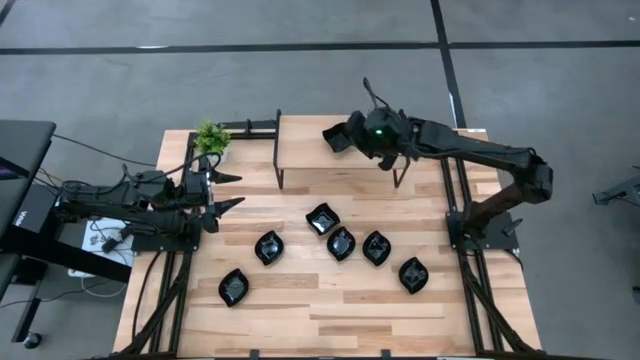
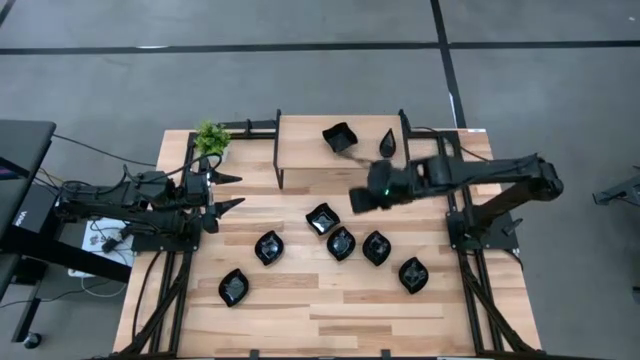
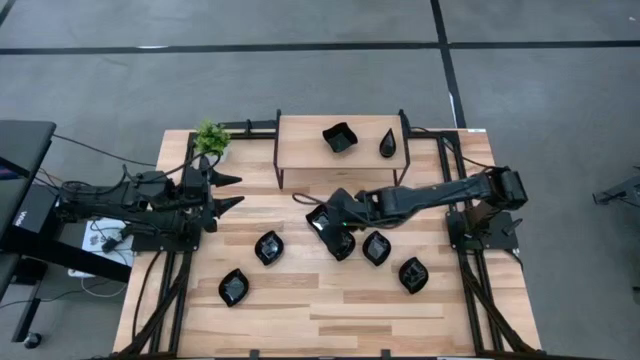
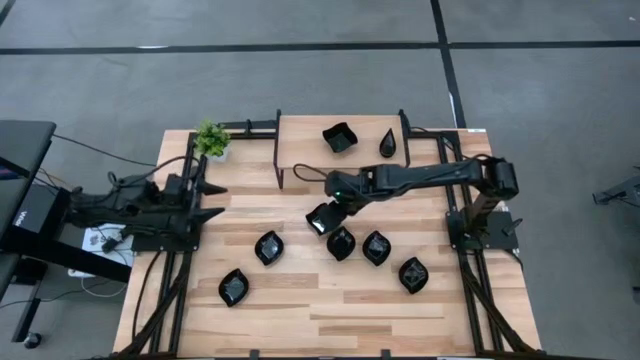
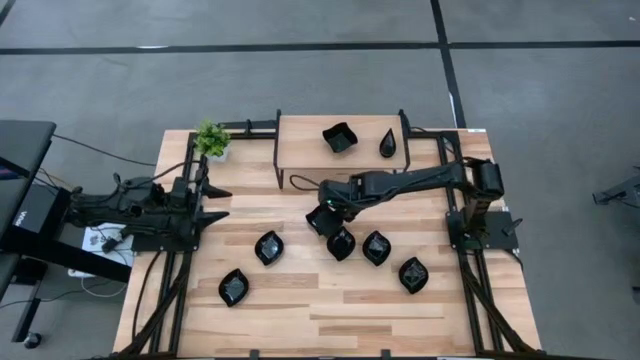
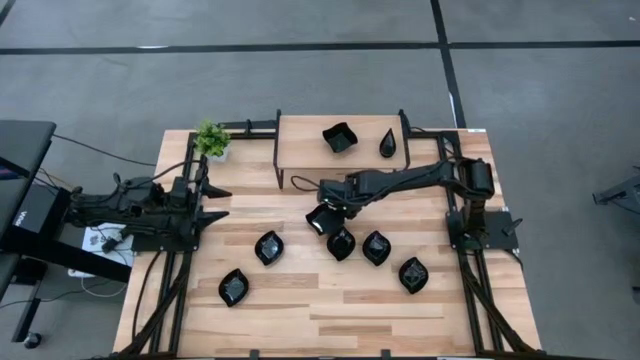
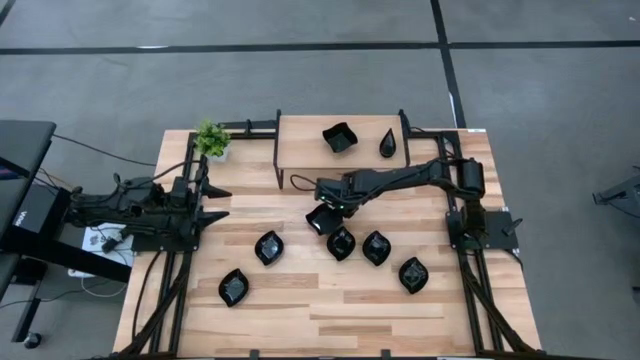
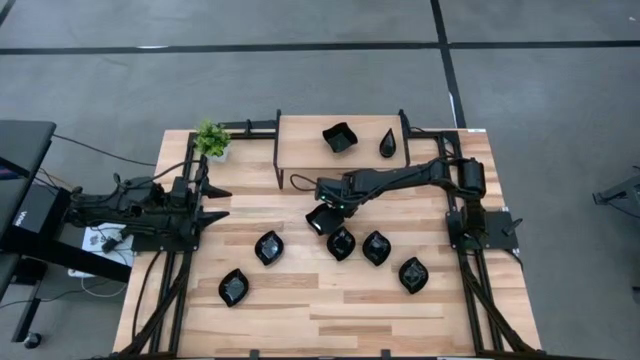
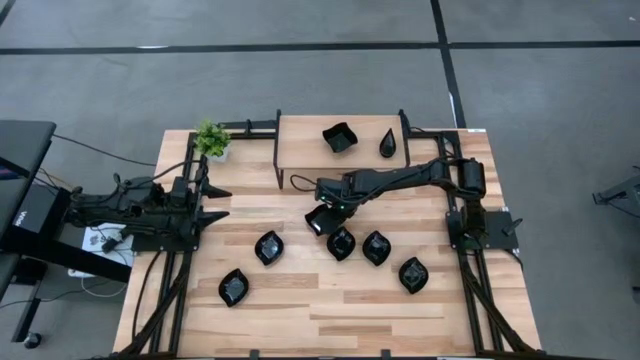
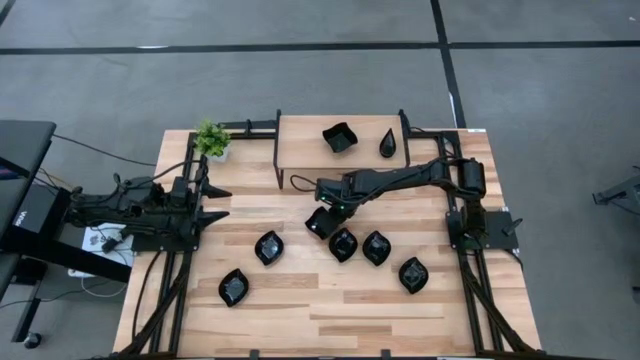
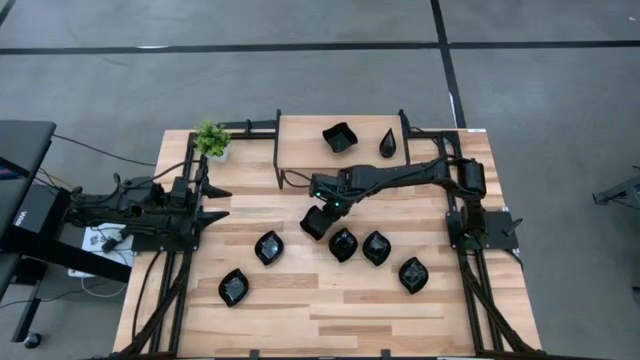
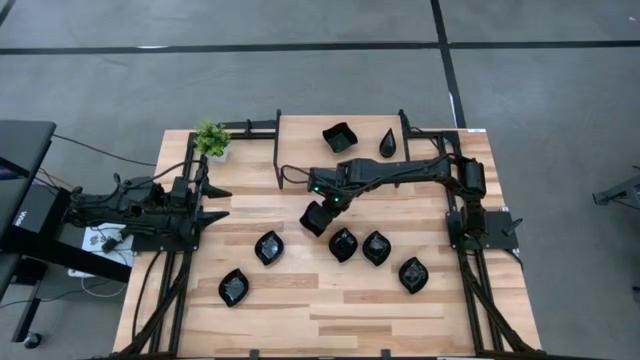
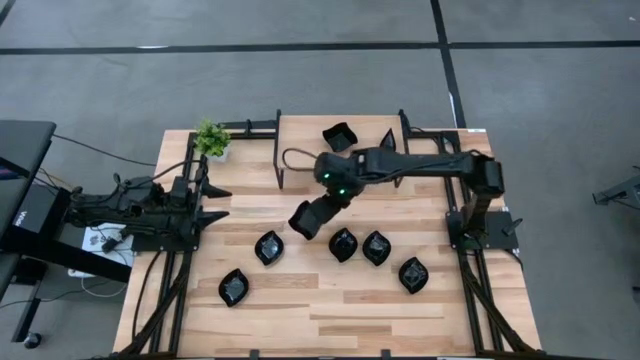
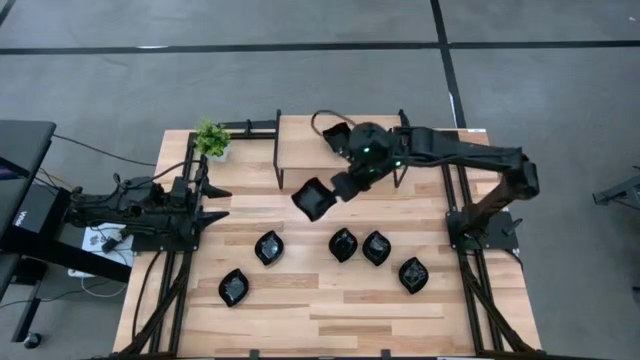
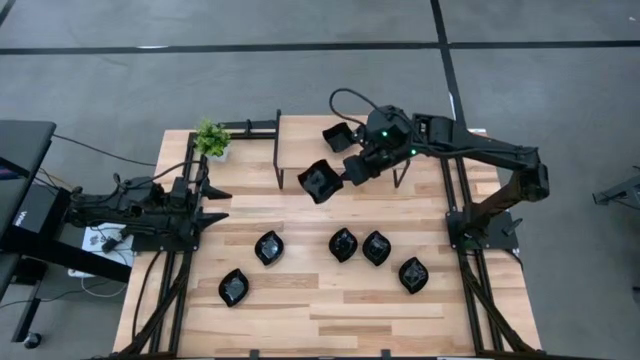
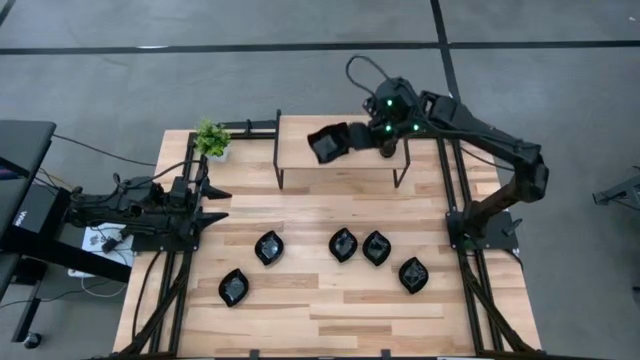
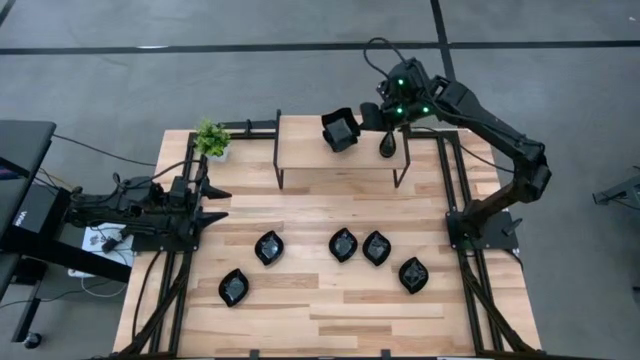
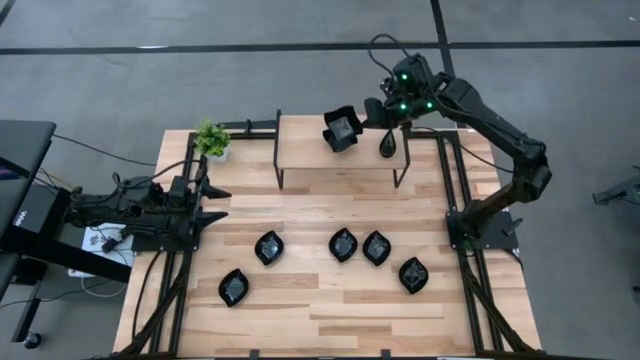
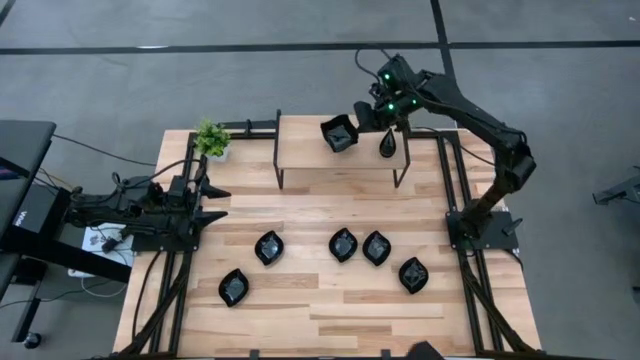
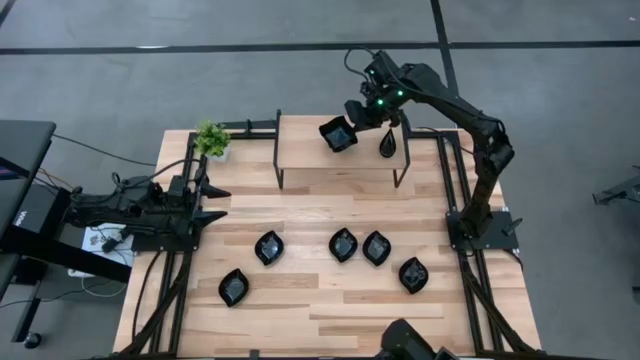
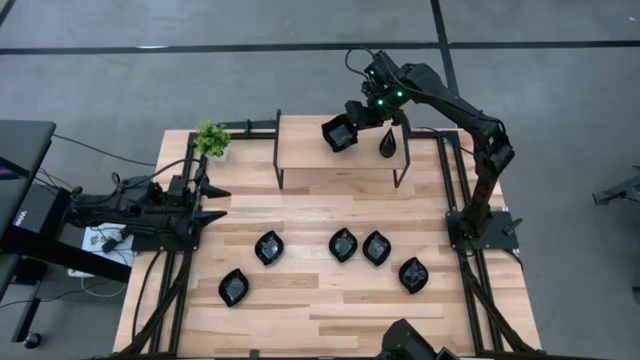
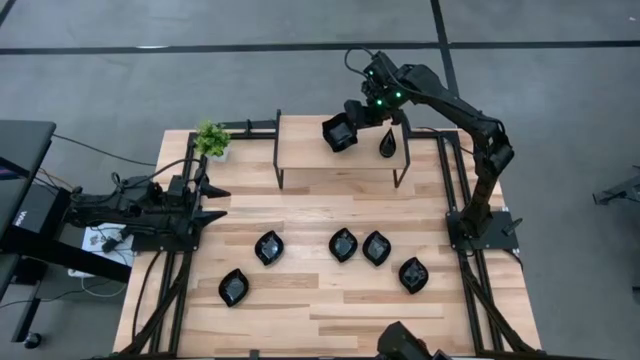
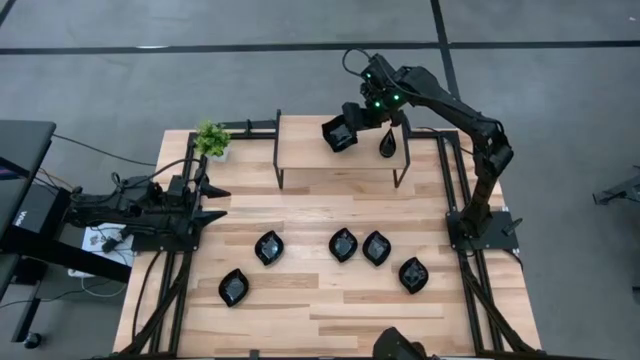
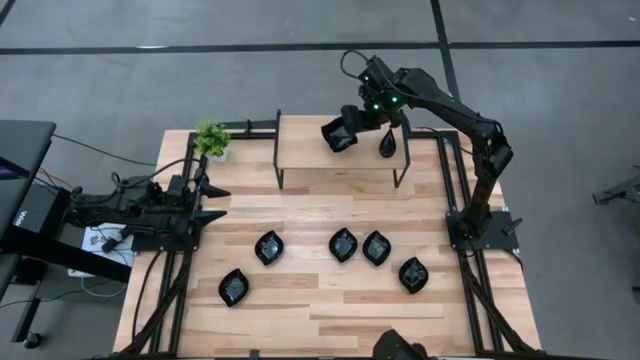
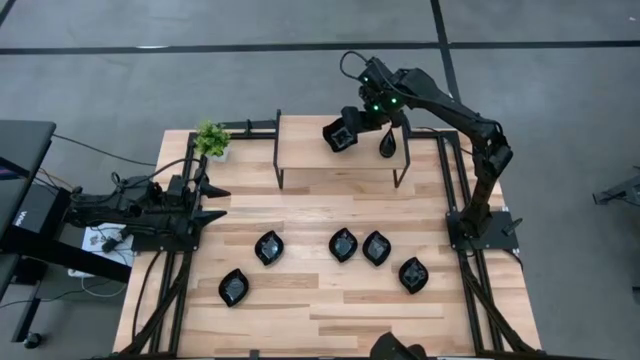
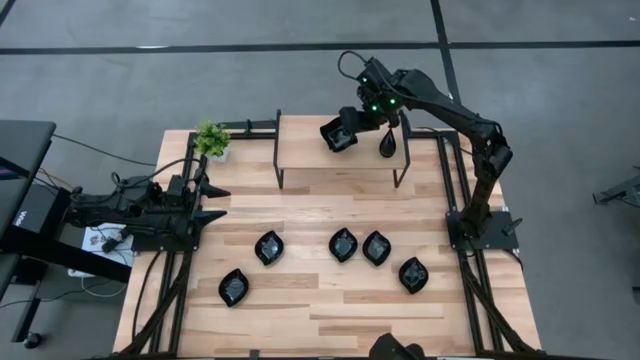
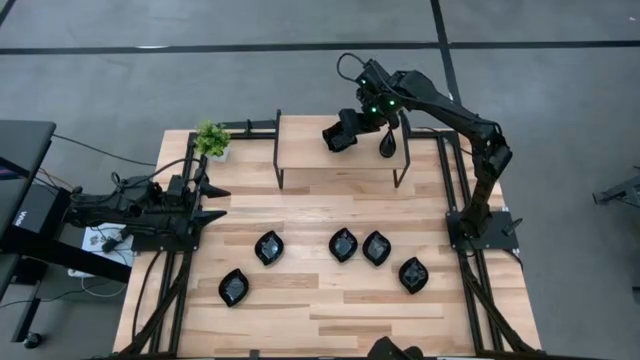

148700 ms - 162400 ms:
Task: Pick & Place Mini shaped plates
Stack the black plate on top of the black plate on the shelf

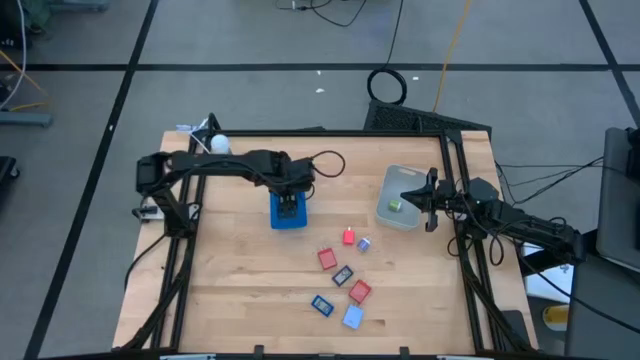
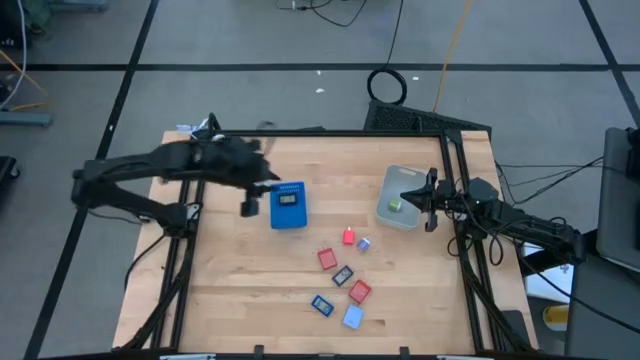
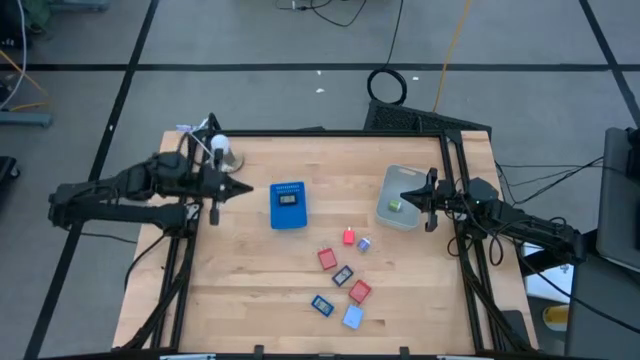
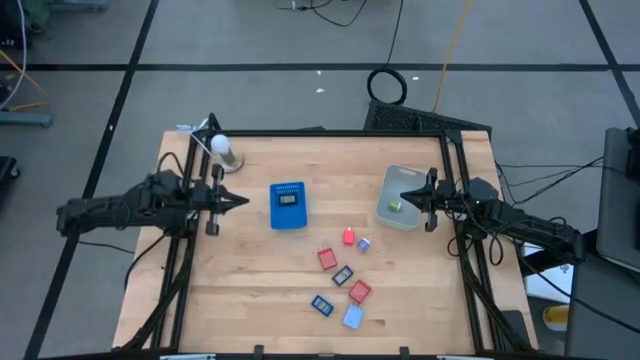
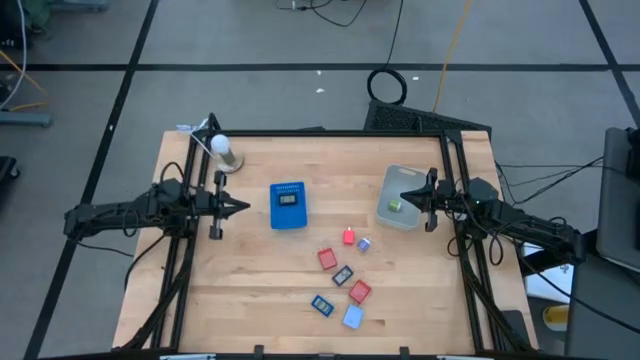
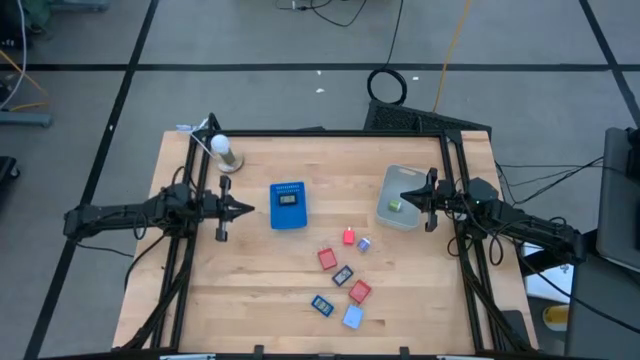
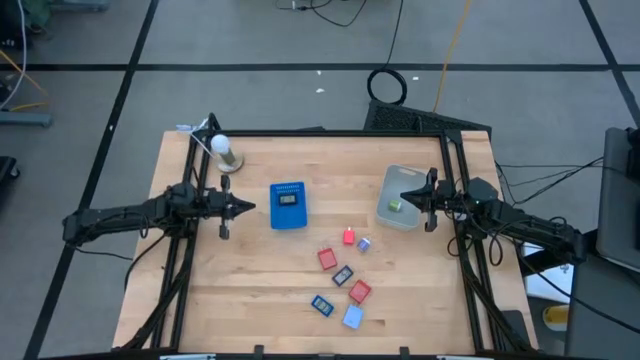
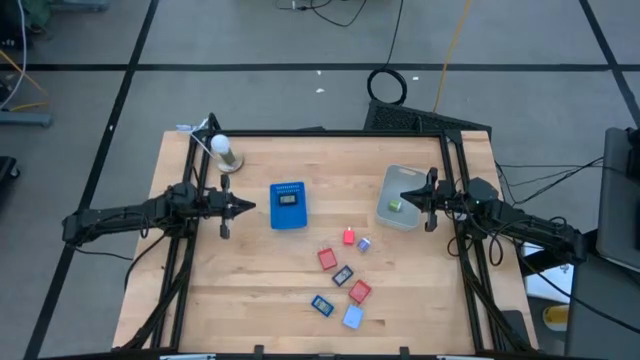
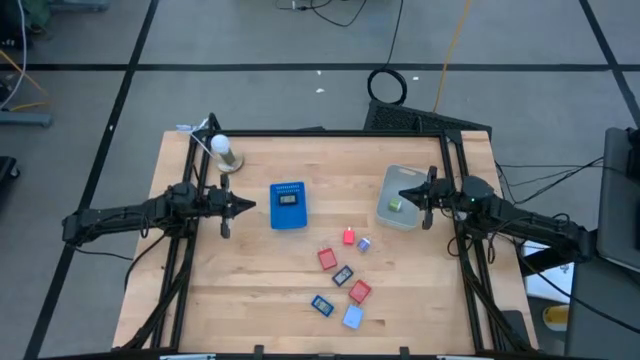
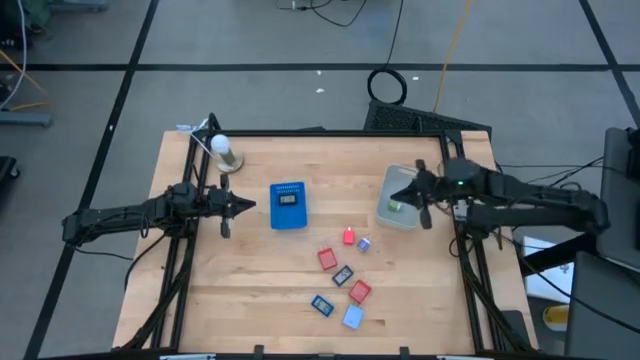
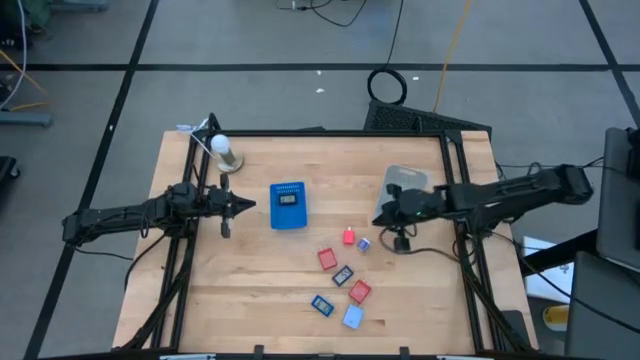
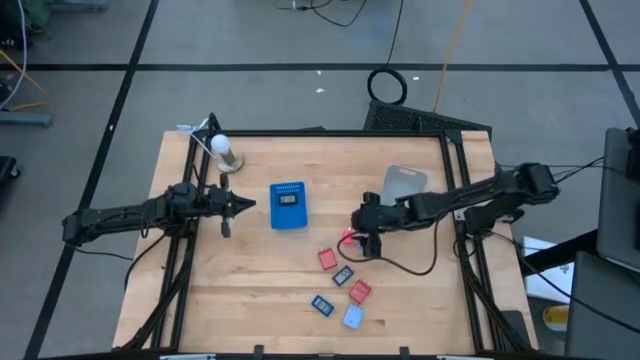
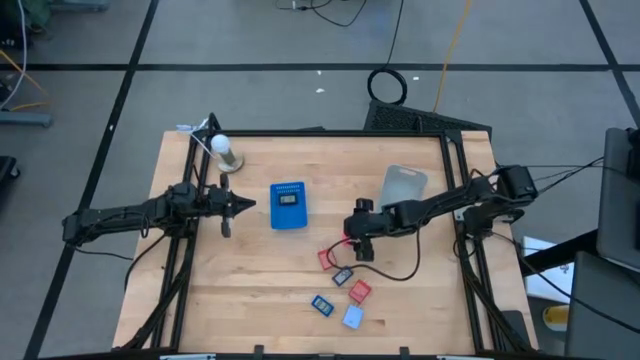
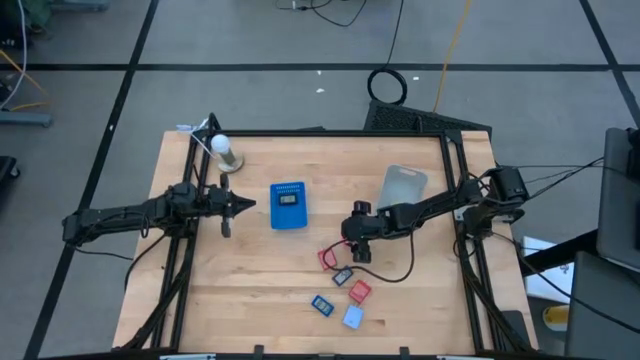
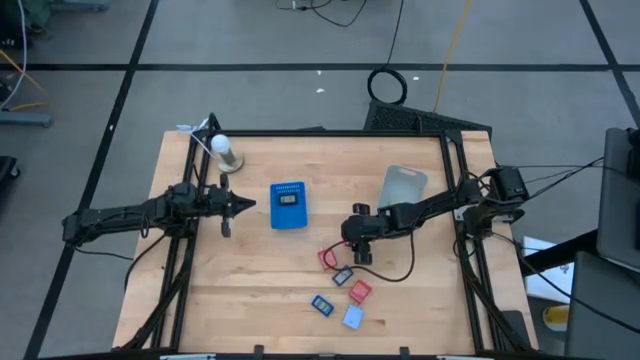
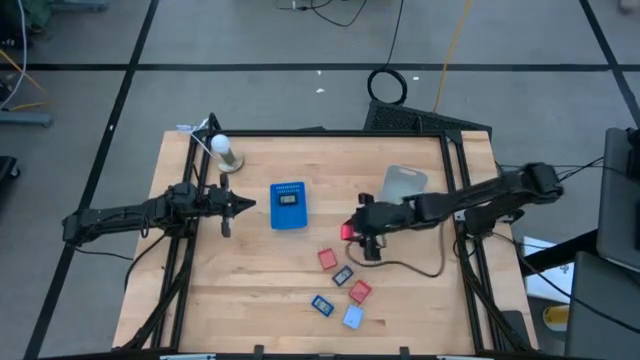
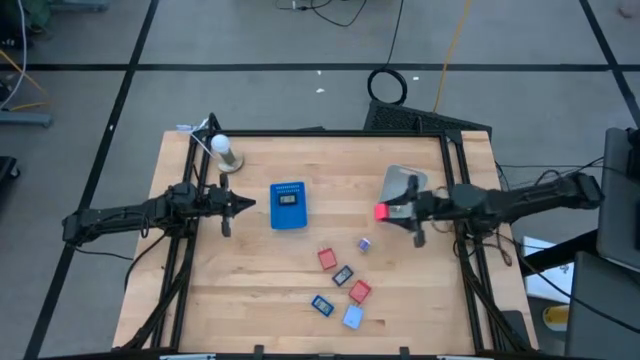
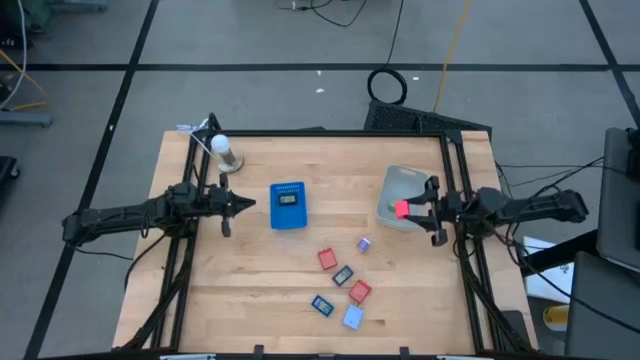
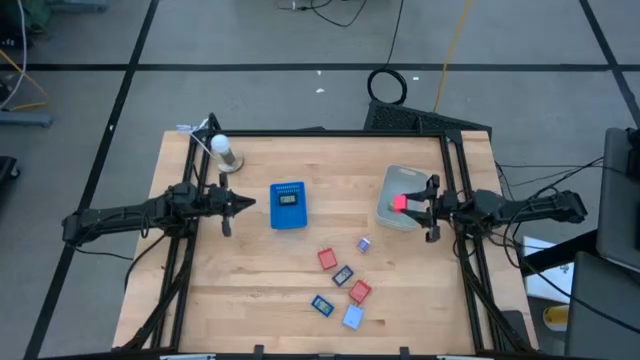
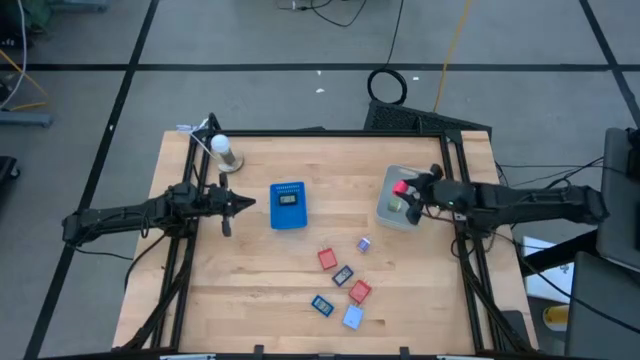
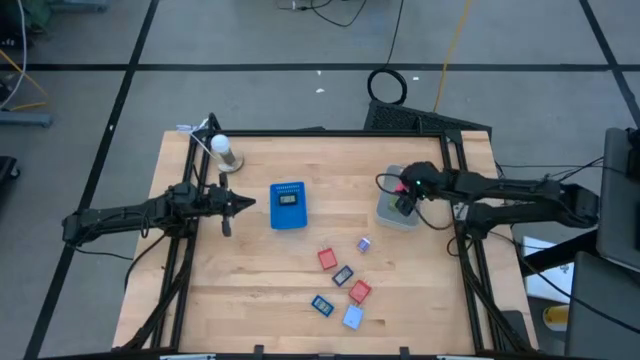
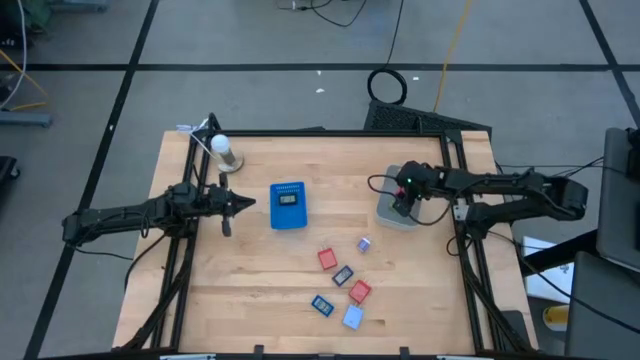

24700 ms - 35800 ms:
Task: Pick & Place Office items
Put the pink charger adapter into the white bin
